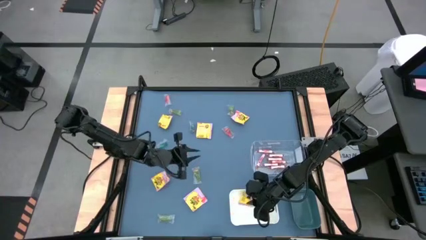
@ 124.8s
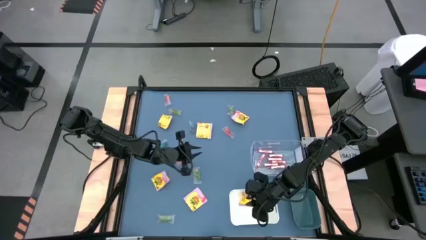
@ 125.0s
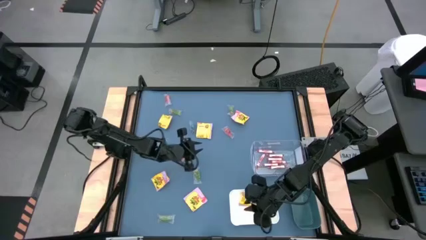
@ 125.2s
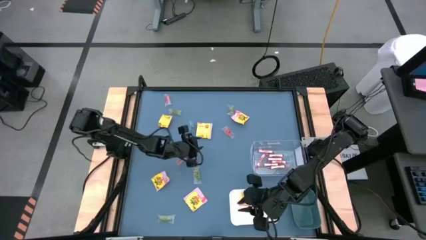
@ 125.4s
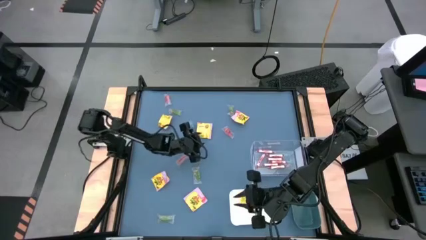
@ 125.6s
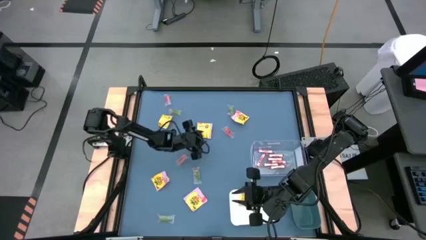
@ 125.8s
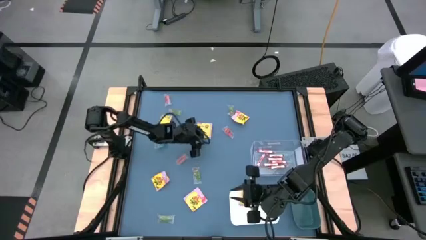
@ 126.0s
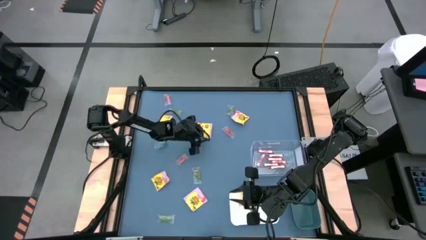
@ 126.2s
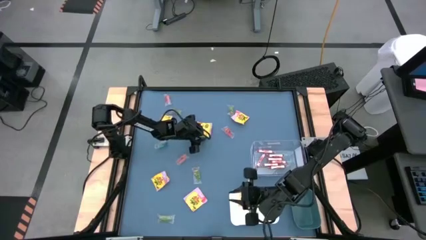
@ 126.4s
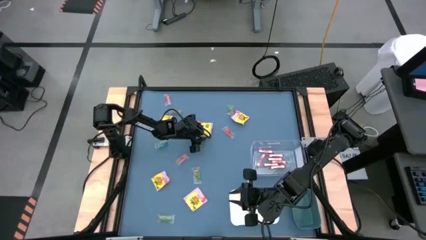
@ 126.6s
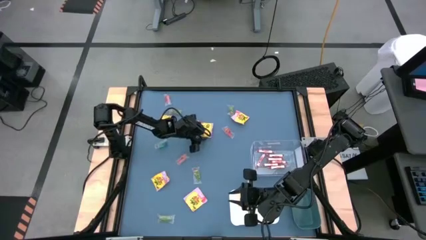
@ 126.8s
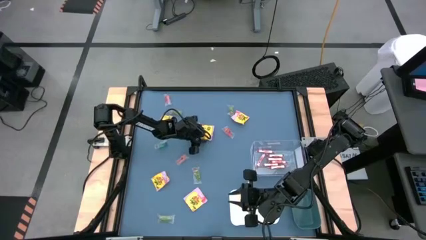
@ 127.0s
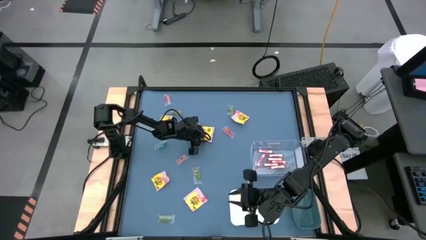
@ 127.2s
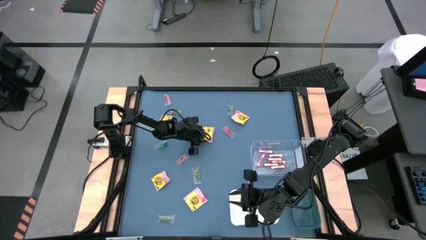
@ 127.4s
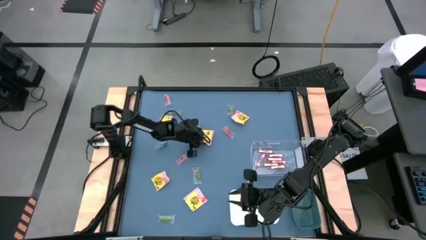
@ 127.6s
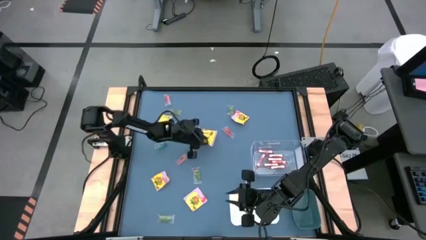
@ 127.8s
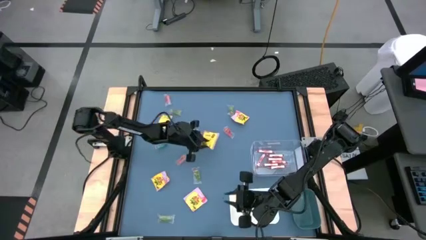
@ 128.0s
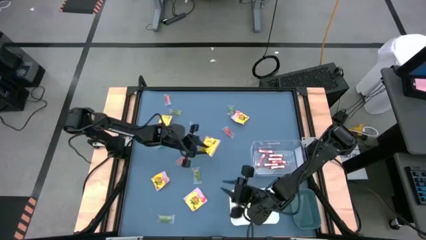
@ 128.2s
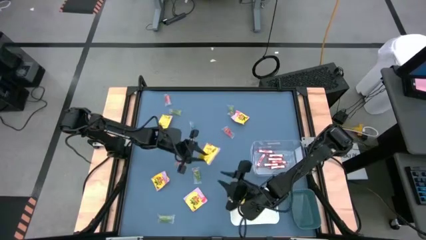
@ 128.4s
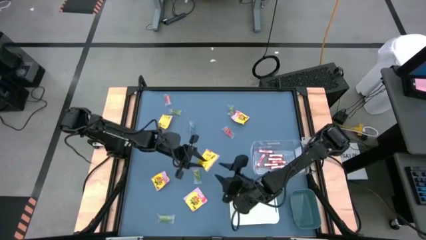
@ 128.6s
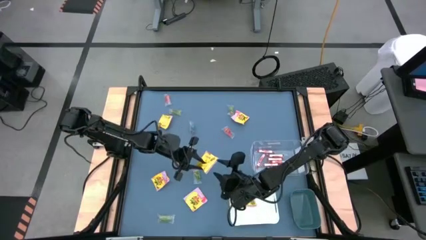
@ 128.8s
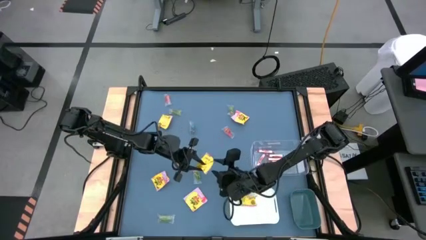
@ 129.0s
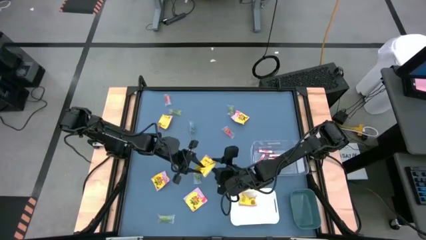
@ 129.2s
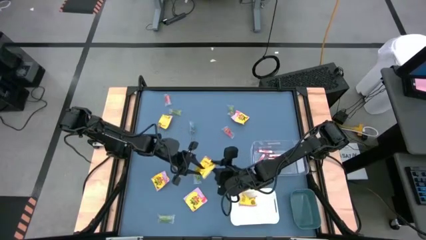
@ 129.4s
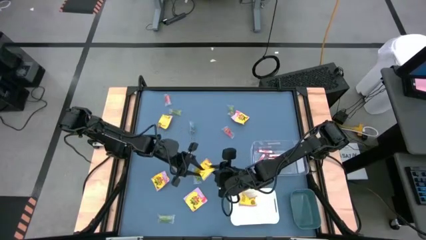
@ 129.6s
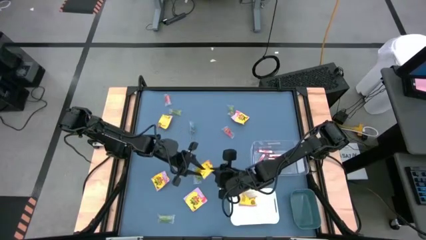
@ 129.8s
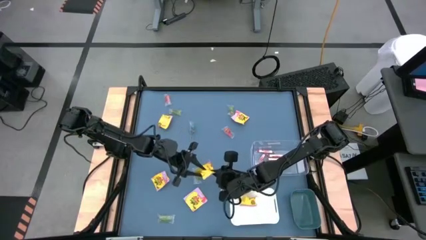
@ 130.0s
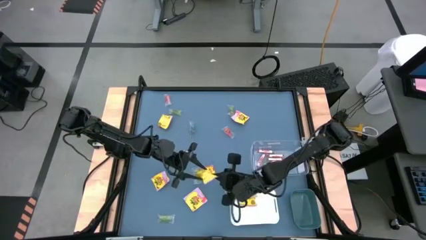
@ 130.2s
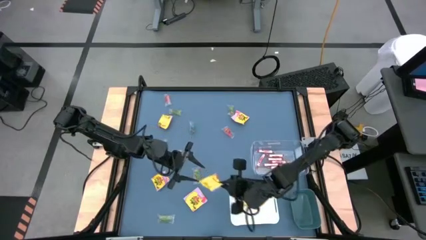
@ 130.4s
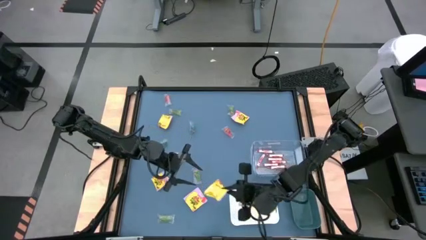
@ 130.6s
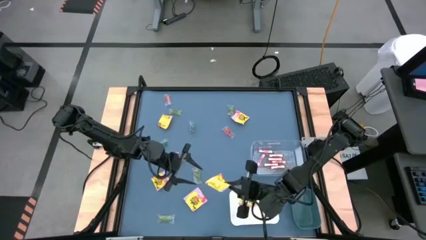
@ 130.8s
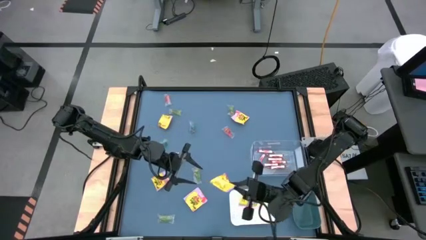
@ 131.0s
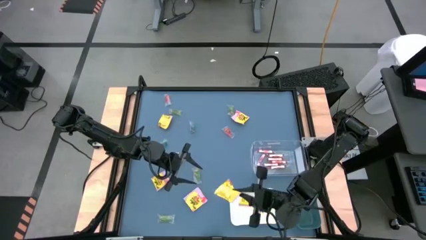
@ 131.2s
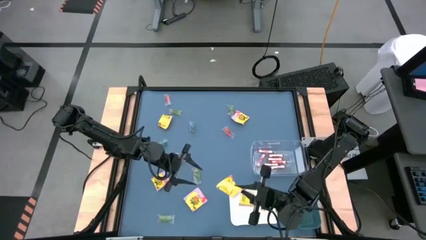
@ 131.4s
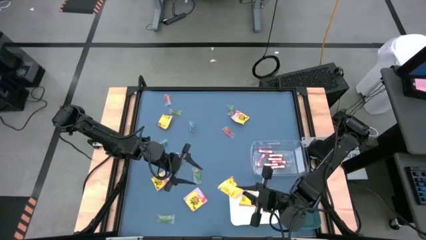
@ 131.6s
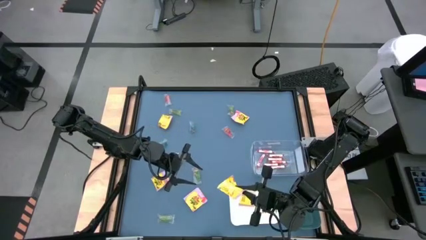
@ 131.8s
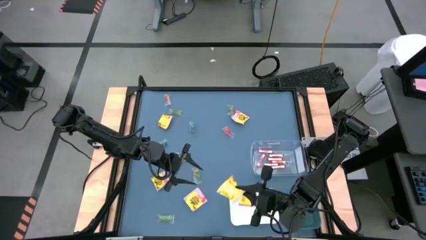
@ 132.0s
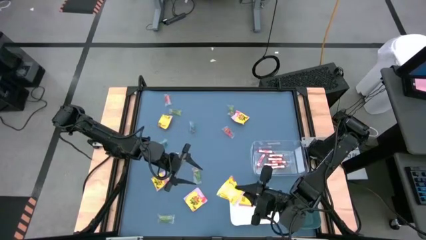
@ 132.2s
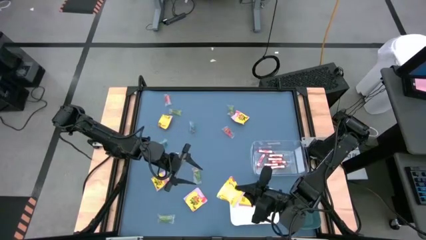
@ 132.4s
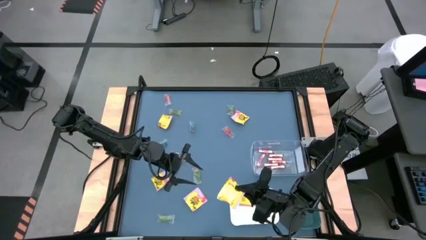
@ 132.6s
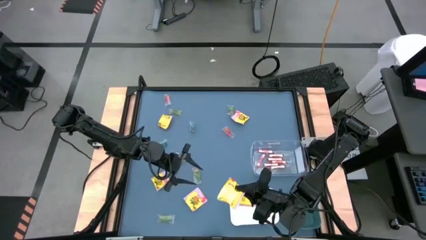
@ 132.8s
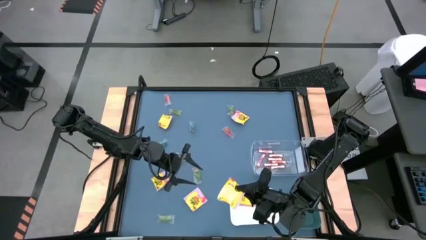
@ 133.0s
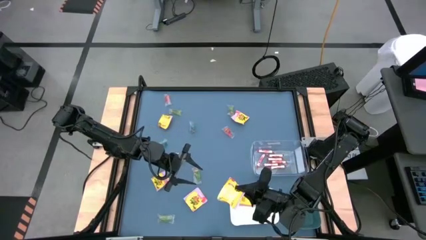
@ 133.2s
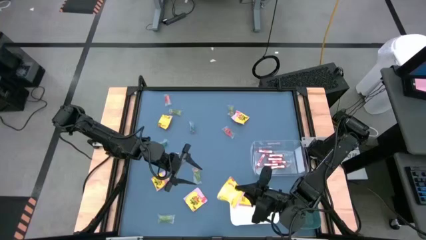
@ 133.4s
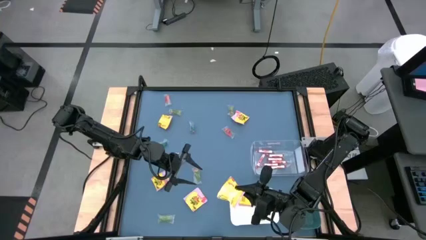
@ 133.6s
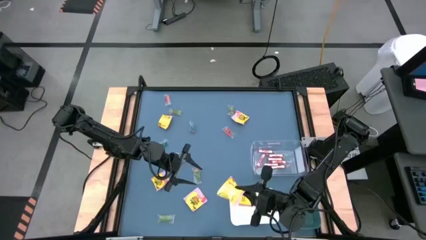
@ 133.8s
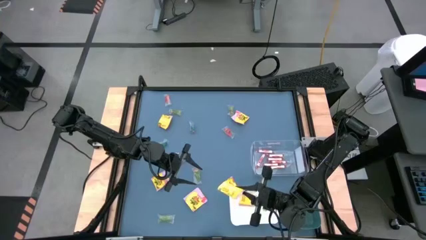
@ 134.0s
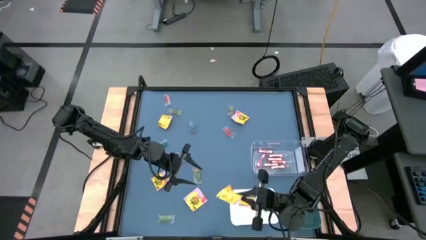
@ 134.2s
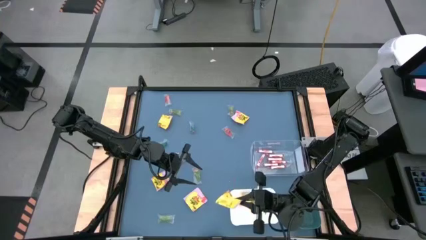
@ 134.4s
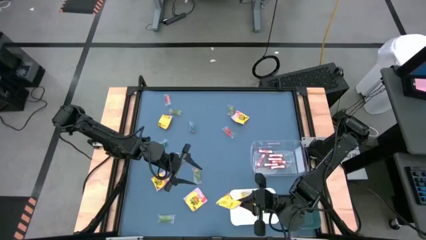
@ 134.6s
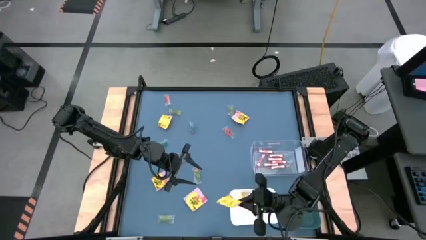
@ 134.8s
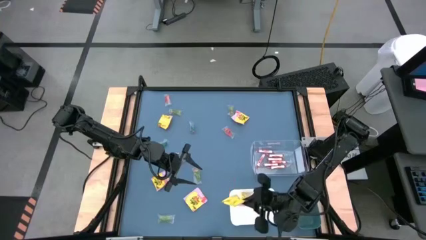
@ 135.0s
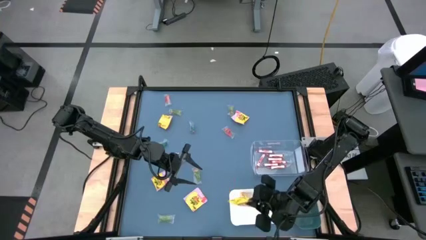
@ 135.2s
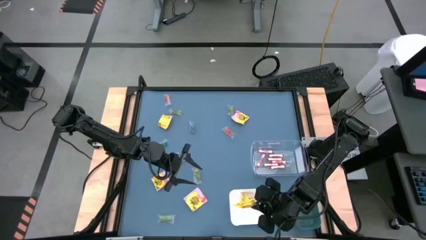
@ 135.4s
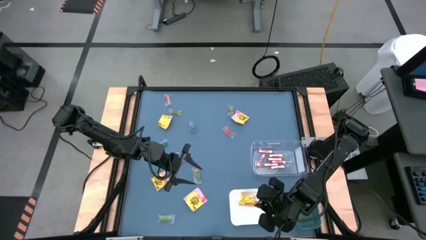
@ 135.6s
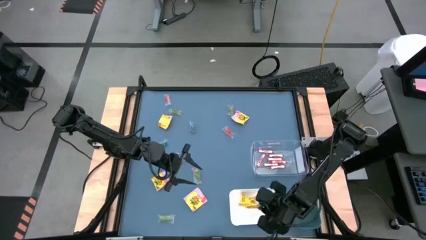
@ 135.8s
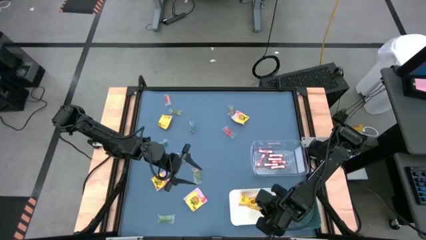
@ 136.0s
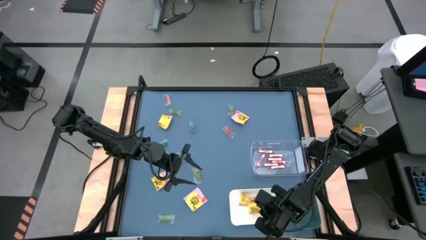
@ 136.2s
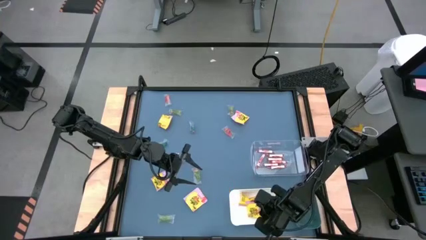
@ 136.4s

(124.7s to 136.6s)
Task: Sort candy
Put the yellow candy into the white bin

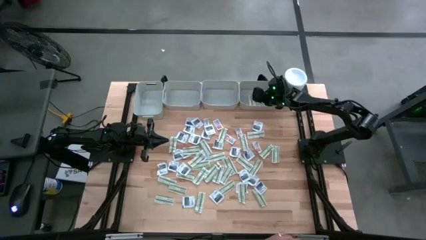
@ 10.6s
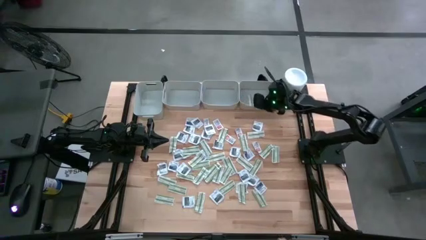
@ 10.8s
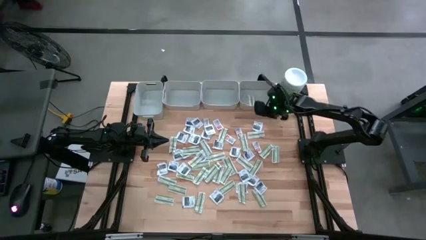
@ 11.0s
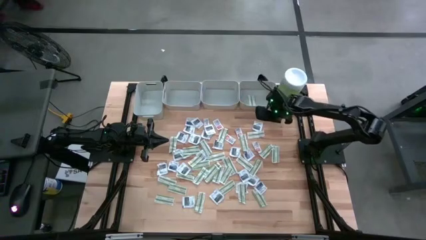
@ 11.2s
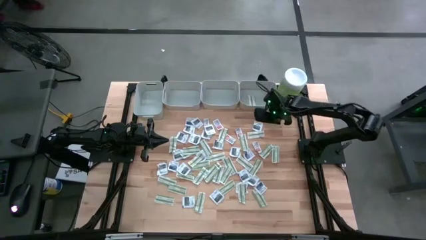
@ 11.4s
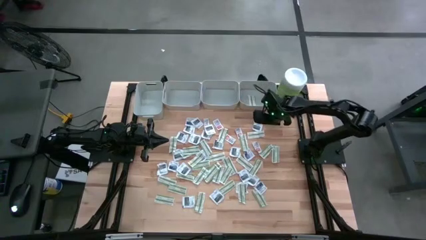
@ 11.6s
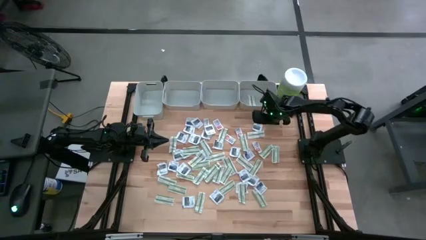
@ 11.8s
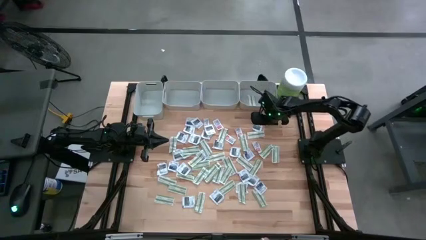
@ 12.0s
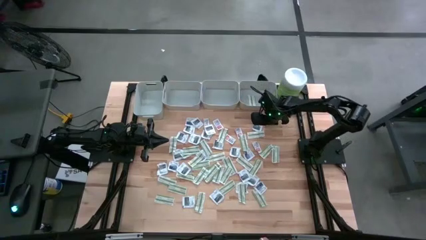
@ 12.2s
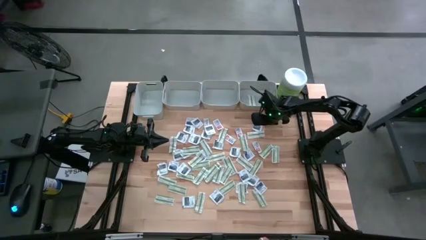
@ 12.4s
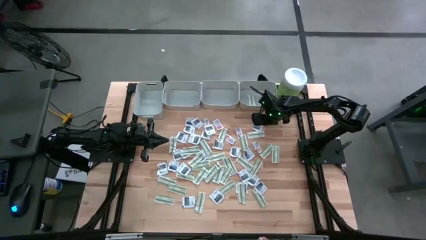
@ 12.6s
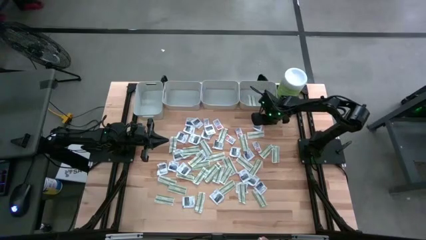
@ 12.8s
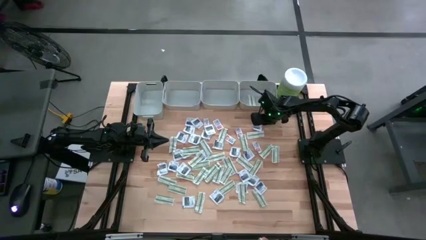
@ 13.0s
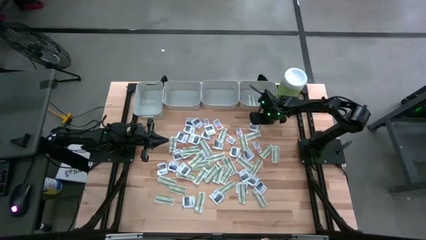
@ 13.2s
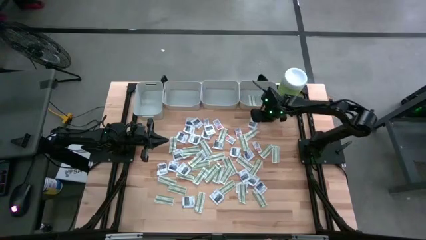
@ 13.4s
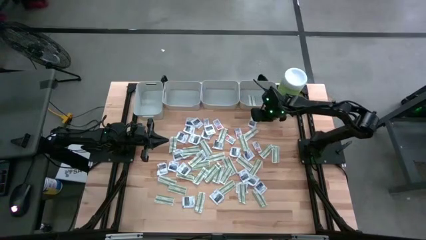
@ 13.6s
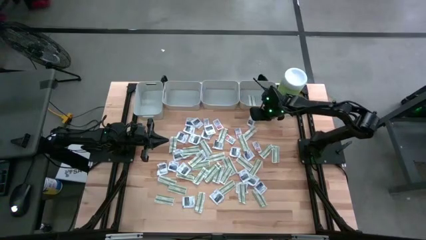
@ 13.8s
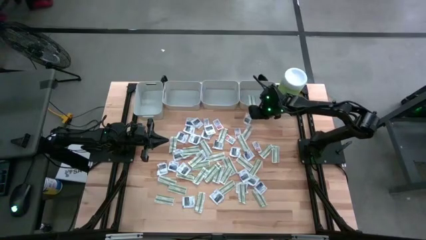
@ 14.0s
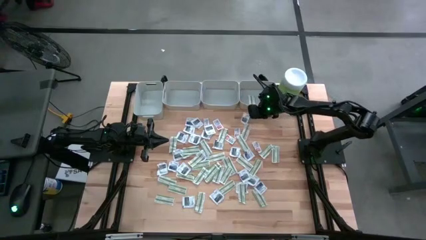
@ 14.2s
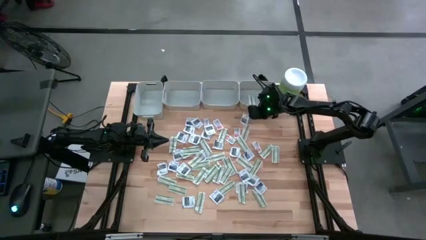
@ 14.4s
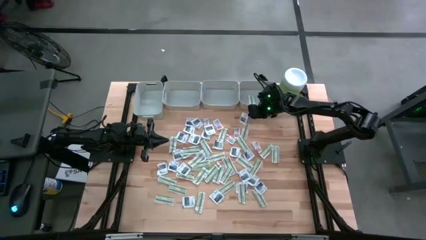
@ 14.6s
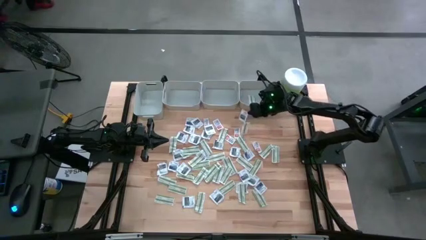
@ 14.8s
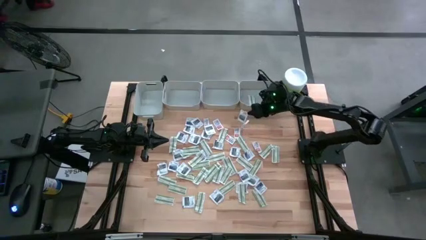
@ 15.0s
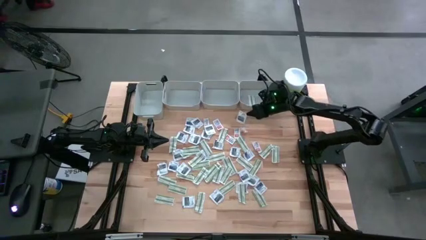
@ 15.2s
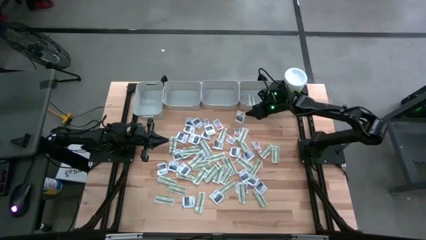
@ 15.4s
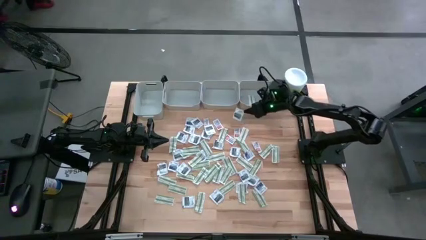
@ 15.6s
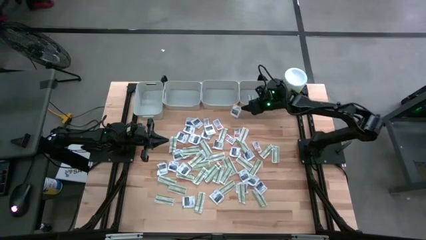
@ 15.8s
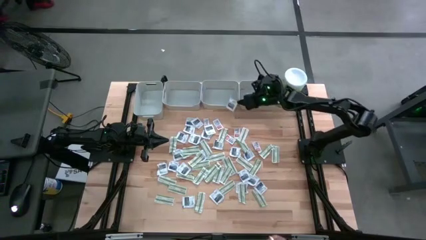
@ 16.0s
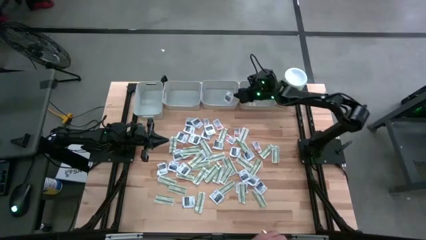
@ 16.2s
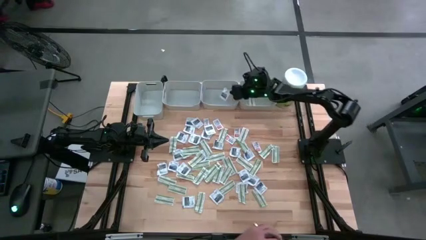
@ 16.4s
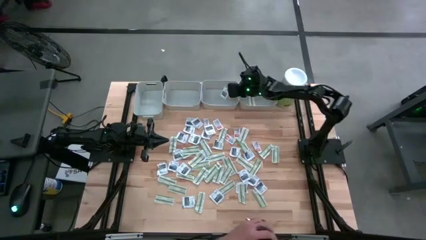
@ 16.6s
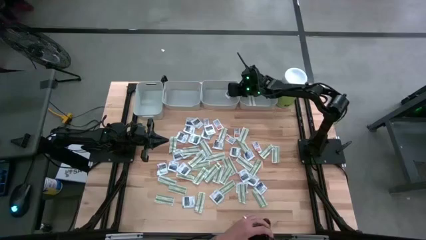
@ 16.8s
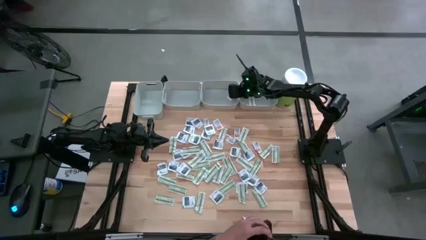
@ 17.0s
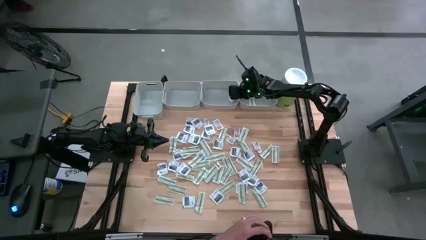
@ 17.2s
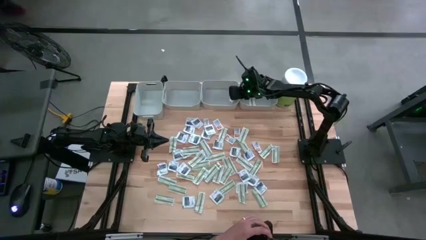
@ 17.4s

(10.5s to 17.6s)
Task: Pick & Place First Aid Supplies
Put the gray towelette pack into the middle right gray bin
